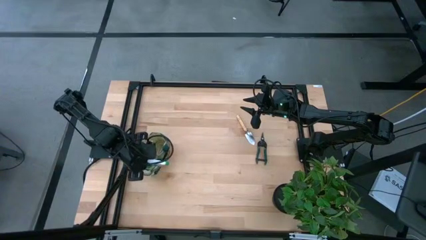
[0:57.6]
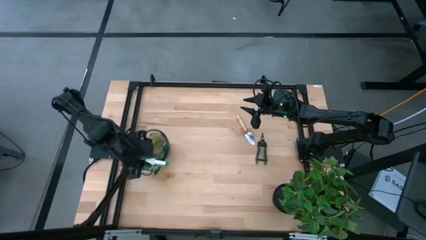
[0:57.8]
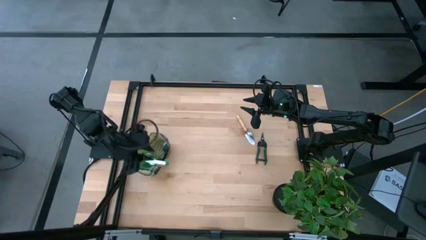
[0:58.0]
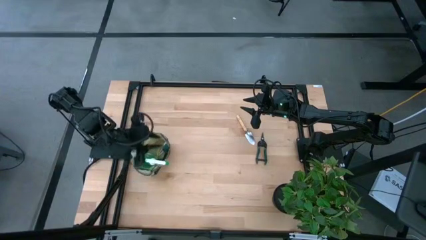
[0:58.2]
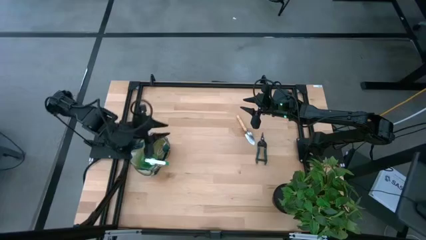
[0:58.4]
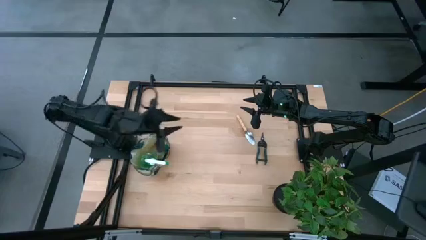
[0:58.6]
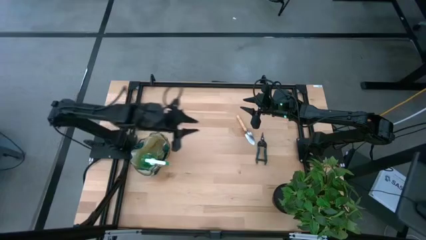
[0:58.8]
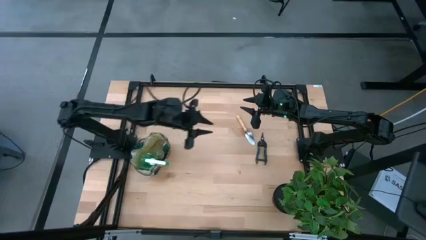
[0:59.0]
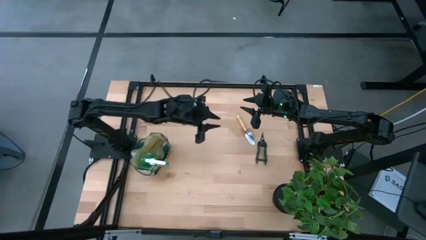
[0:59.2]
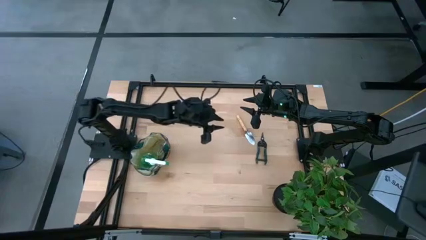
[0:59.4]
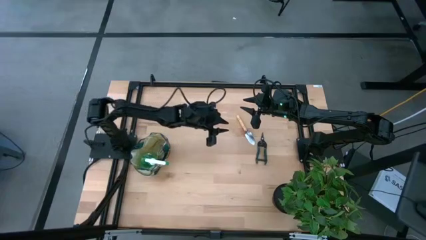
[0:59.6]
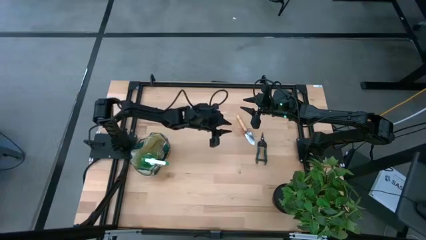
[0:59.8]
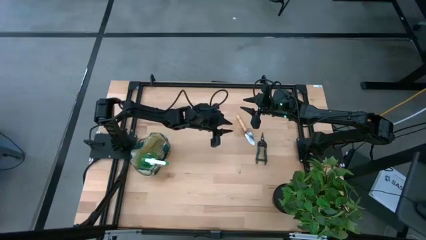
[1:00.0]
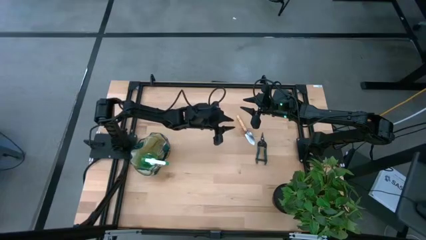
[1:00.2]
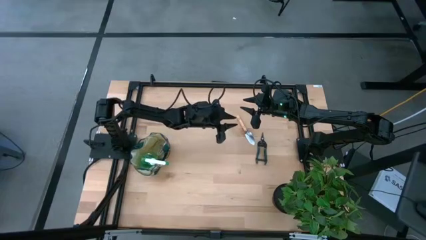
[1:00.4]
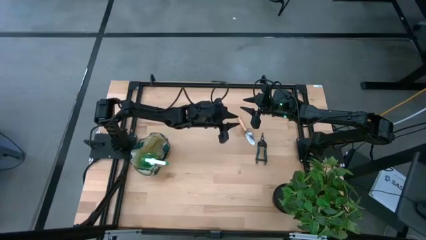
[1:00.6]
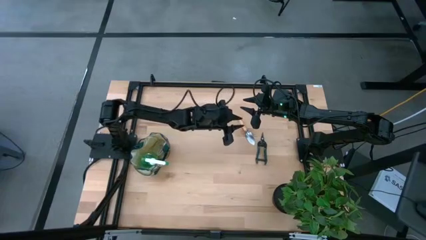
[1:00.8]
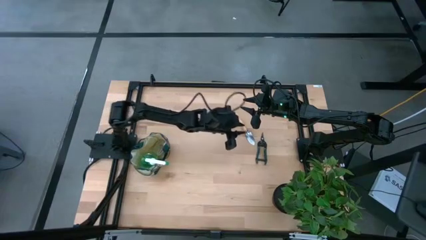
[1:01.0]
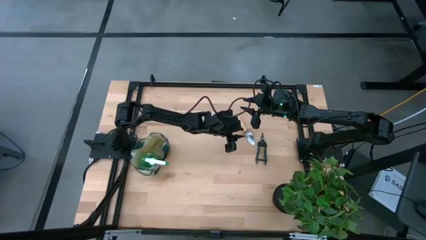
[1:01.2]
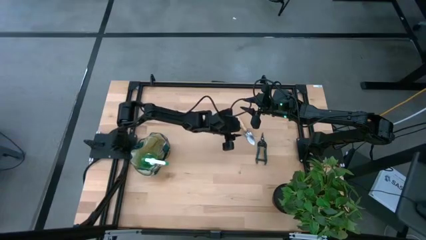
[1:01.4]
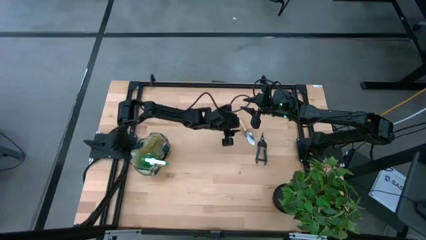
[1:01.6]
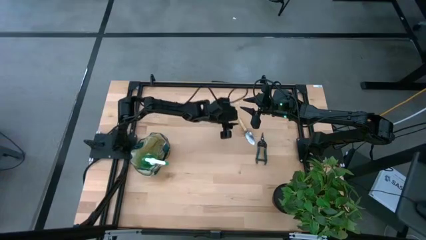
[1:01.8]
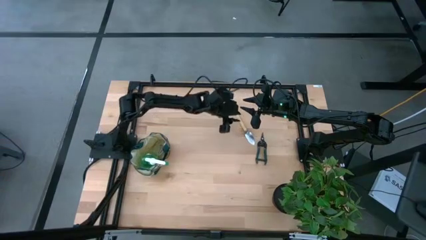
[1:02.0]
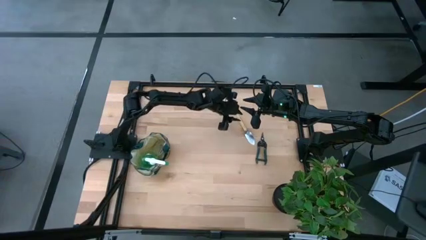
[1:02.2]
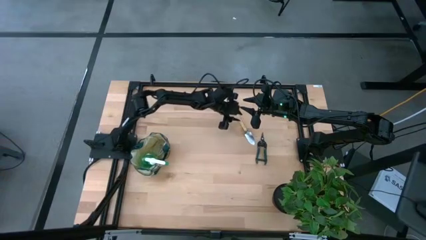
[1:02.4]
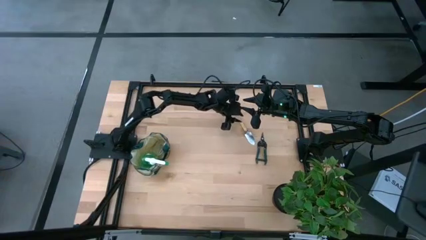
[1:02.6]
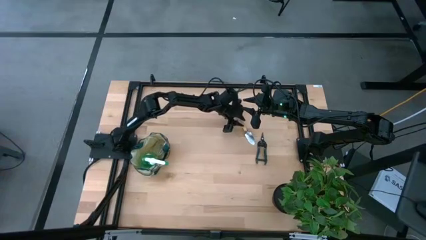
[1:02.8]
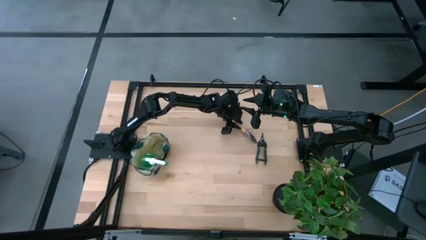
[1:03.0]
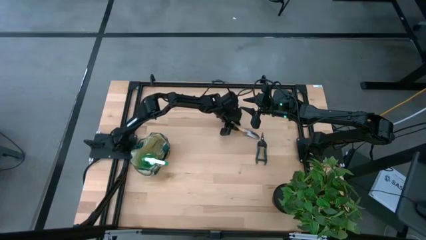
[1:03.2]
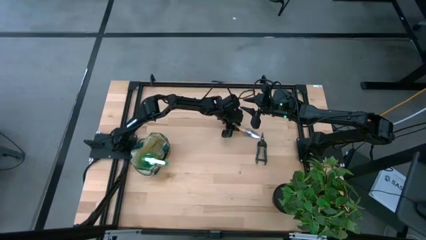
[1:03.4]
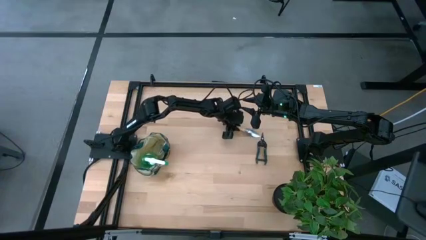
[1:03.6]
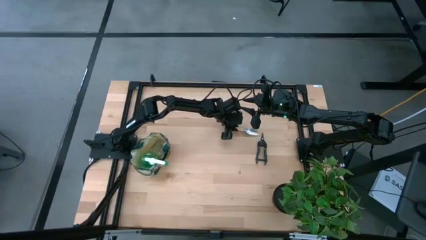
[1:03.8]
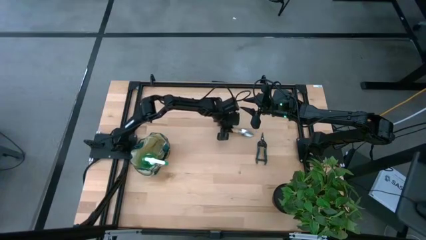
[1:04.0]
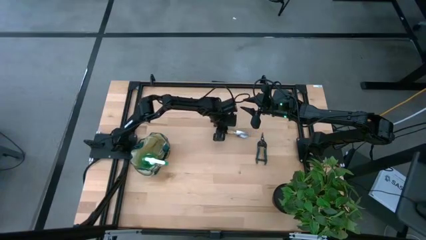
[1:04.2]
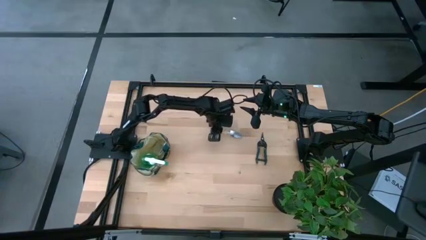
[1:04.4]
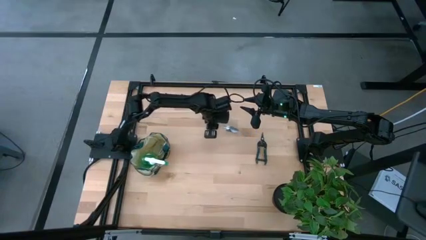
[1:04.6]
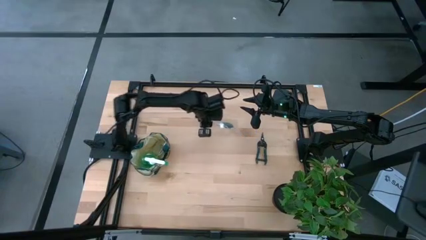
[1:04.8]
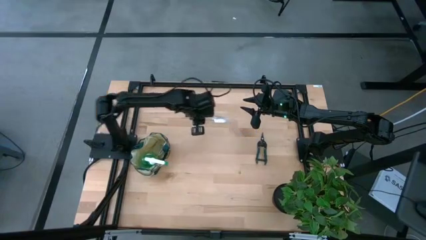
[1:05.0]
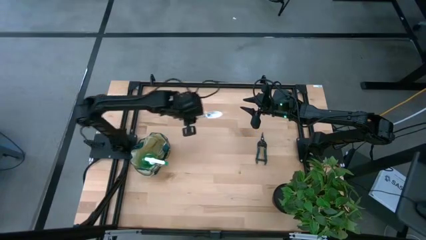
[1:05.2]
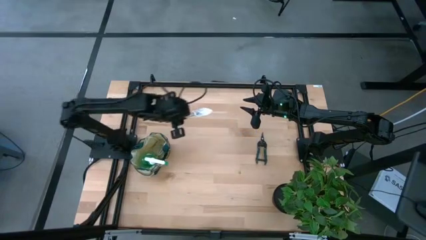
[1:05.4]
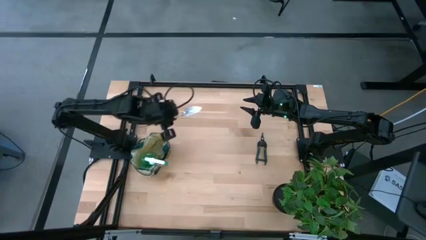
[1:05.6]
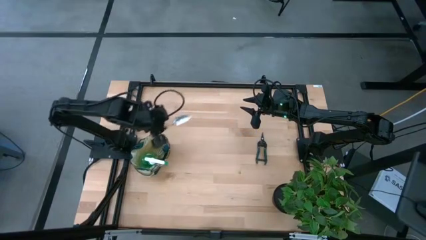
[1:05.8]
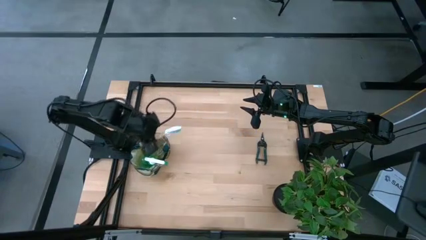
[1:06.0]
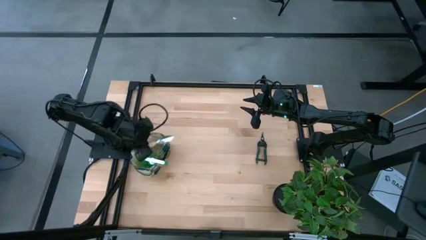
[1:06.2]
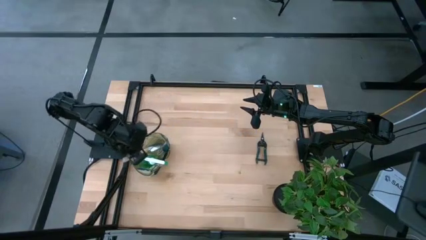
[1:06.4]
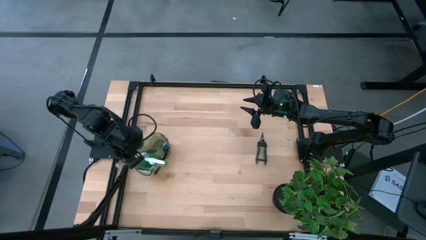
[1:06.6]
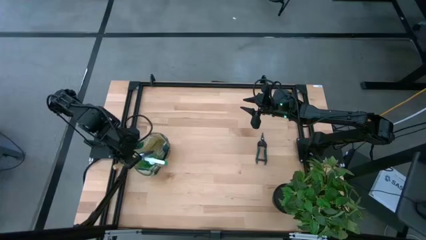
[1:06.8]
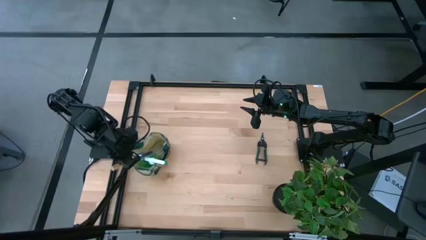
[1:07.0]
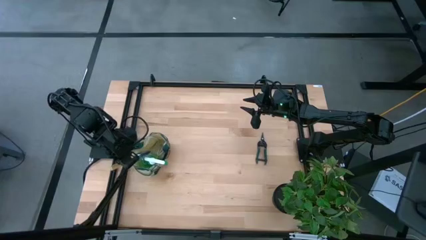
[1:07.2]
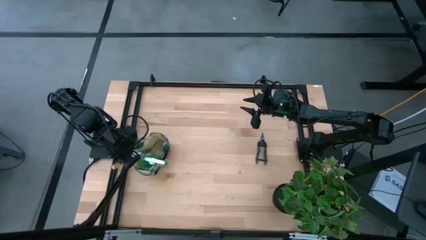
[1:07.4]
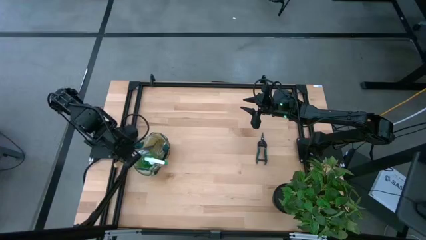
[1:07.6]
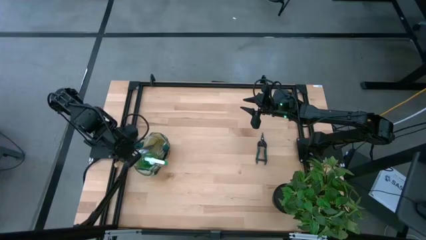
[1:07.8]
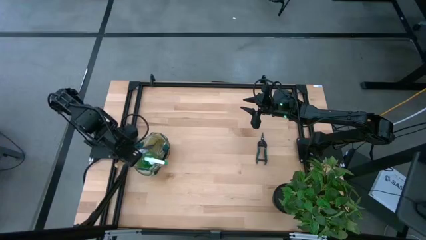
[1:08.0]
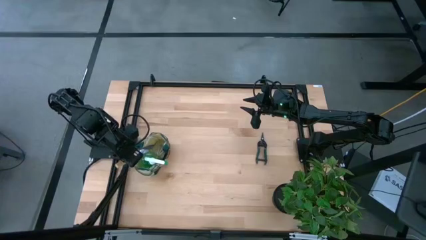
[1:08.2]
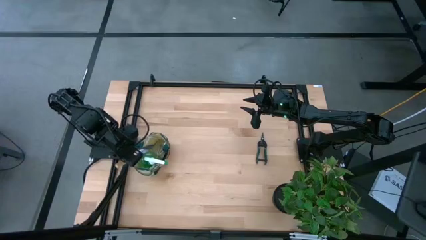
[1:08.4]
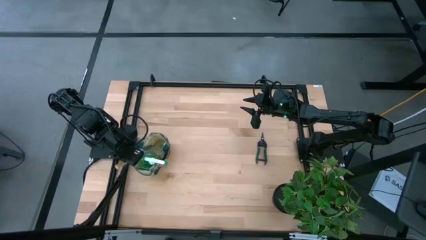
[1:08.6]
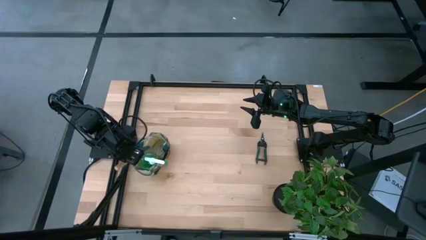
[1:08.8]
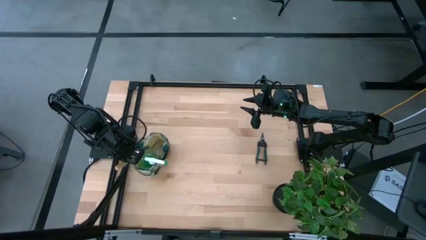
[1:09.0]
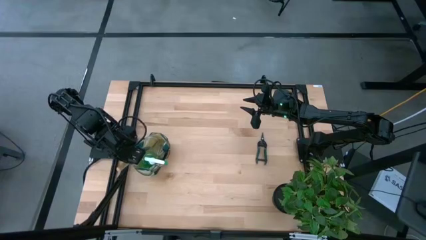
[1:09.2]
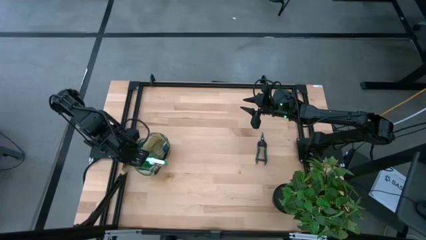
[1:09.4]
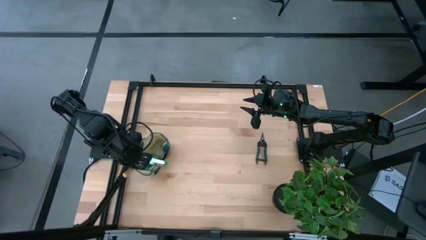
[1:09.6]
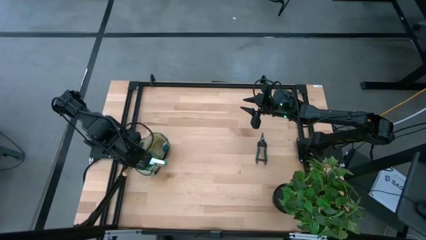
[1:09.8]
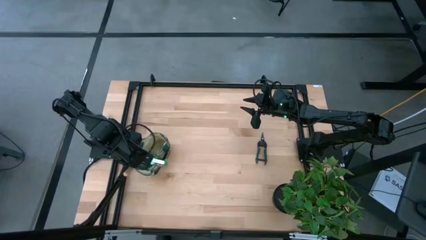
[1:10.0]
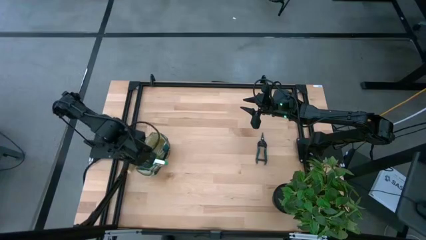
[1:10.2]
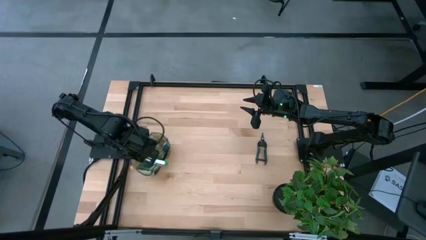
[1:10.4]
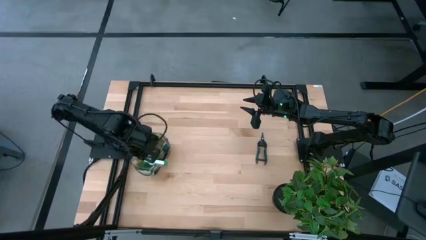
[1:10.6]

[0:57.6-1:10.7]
Task: Pick & Place Garden tools in Gardening bag
Put the brown trowel into the gardening bag

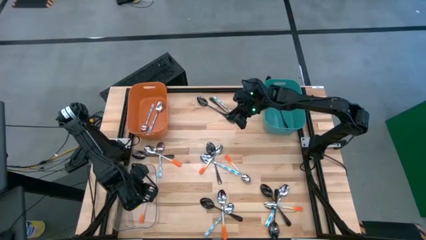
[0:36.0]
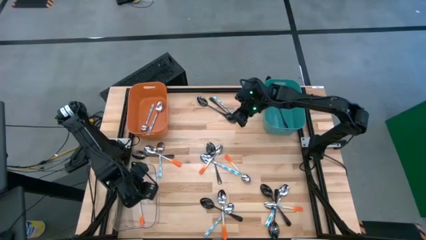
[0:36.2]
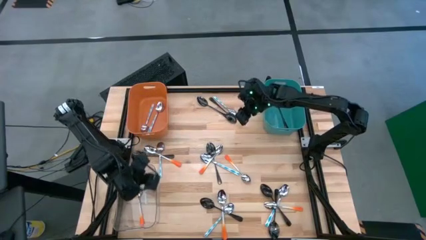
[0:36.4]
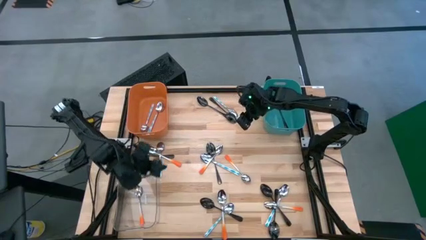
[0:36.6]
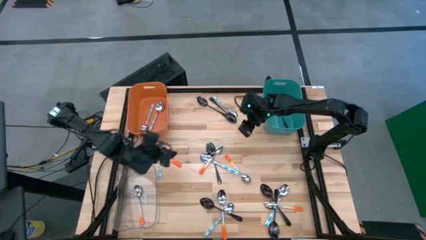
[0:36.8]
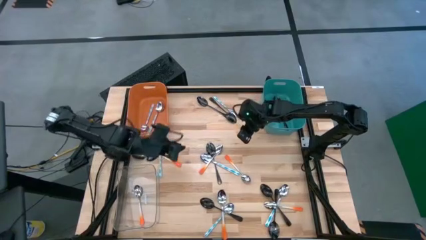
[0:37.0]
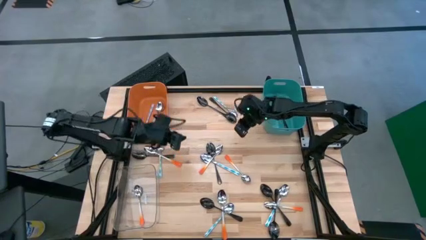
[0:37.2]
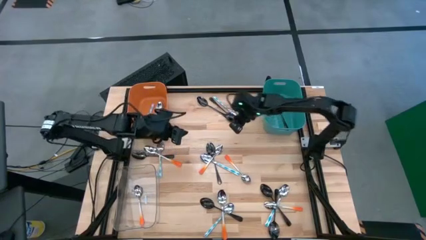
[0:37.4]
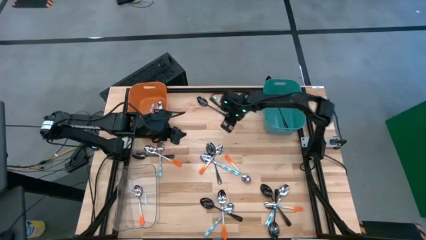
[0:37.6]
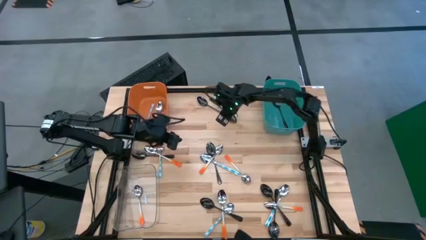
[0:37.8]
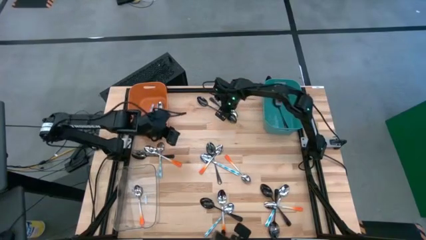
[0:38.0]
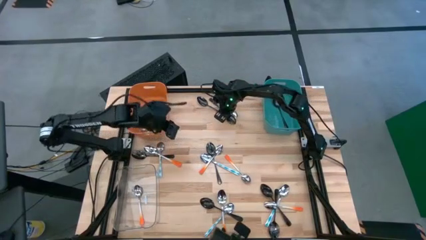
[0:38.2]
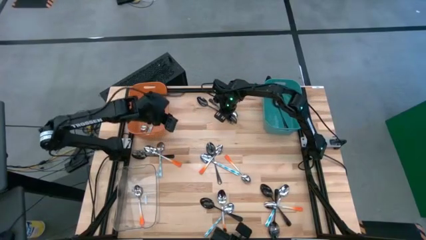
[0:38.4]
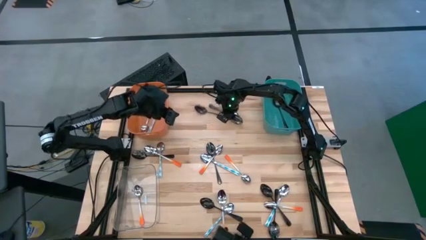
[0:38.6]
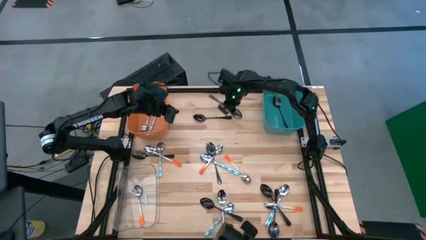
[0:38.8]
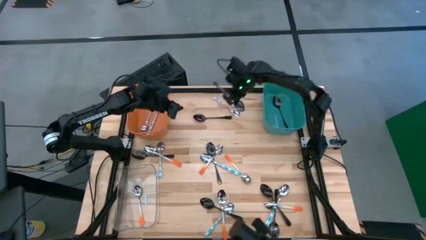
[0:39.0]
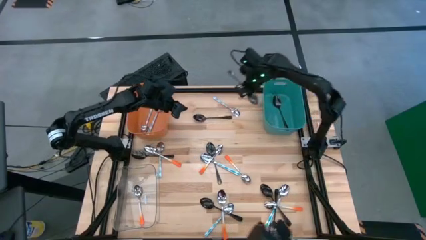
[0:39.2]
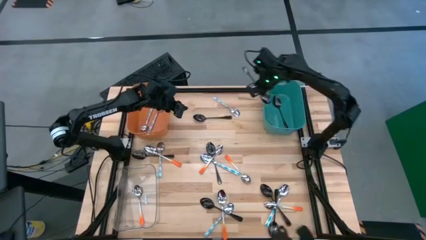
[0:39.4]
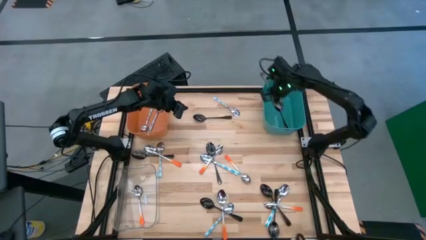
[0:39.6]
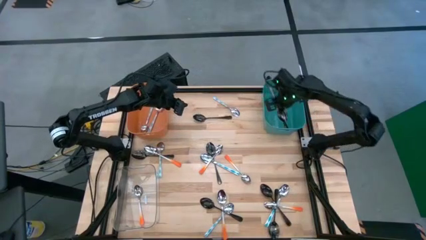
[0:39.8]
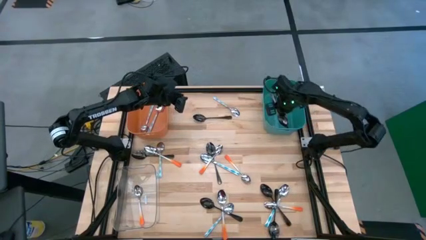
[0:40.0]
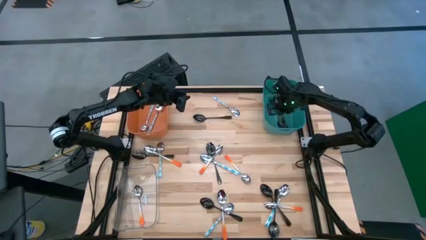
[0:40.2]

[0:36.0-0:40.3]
Task: Sort silverware by color (type)
Put the black spoon into the green bin
